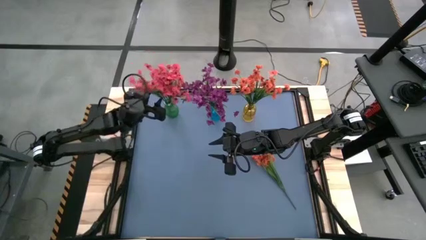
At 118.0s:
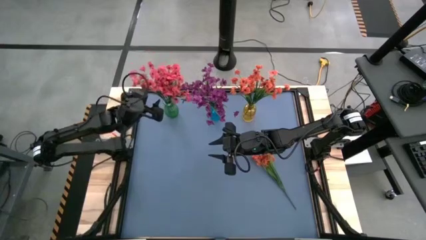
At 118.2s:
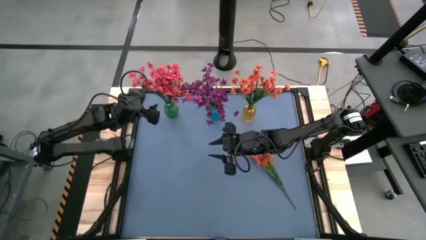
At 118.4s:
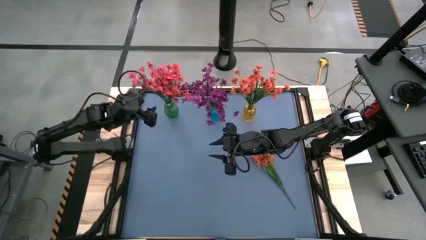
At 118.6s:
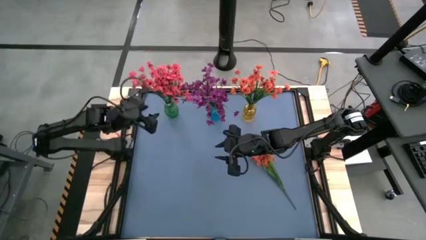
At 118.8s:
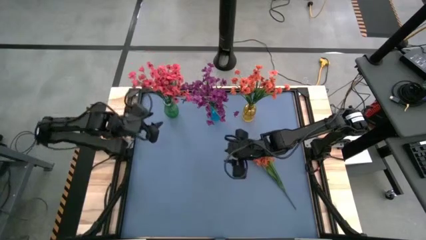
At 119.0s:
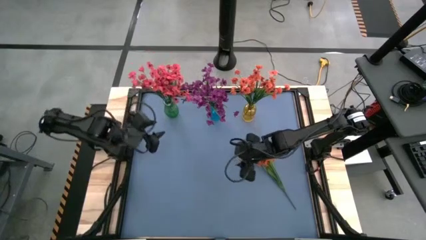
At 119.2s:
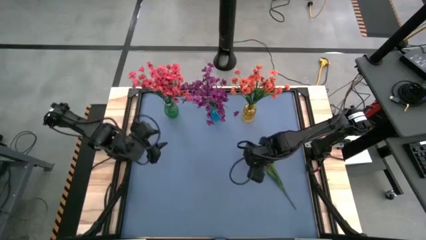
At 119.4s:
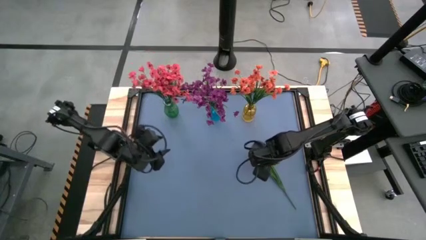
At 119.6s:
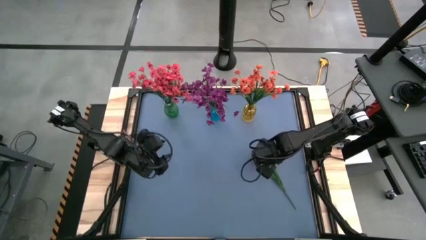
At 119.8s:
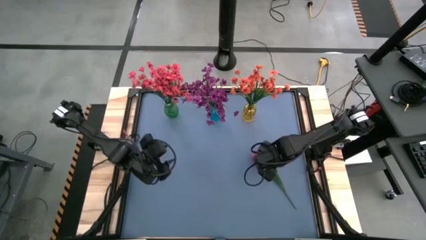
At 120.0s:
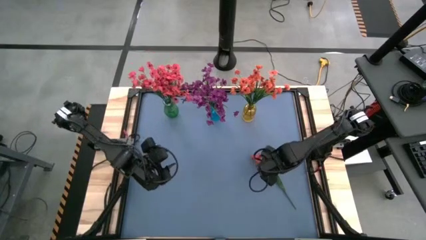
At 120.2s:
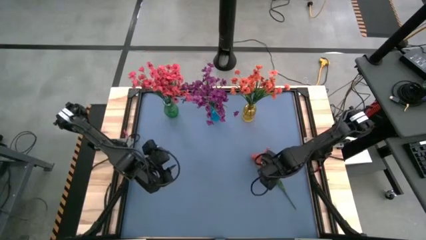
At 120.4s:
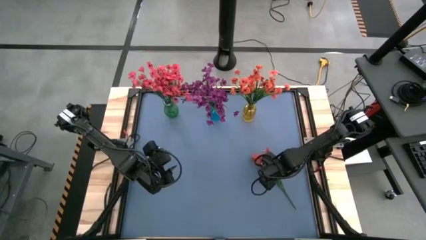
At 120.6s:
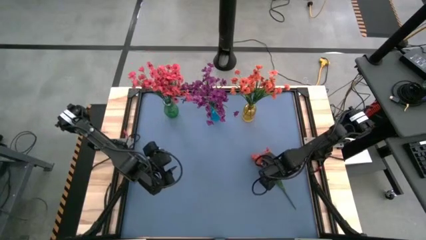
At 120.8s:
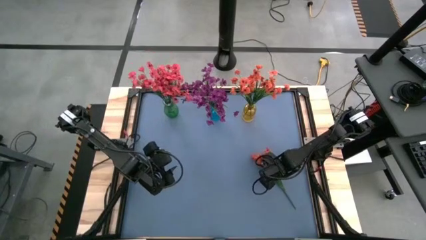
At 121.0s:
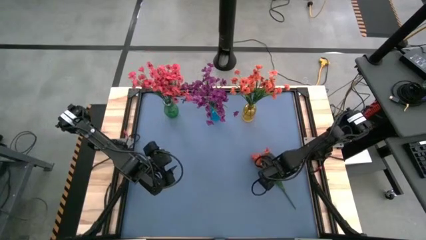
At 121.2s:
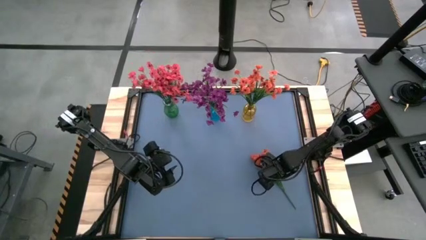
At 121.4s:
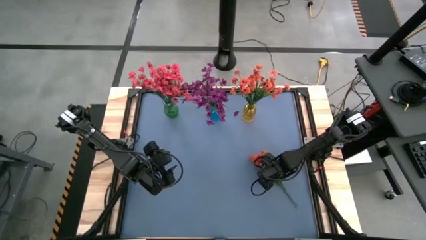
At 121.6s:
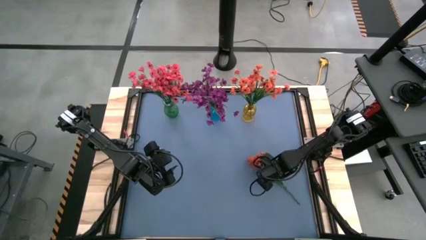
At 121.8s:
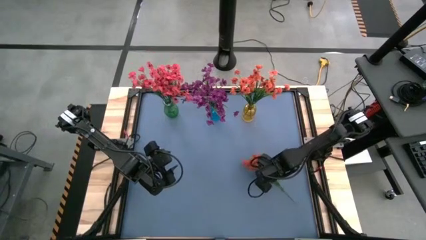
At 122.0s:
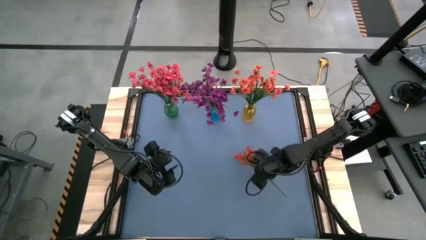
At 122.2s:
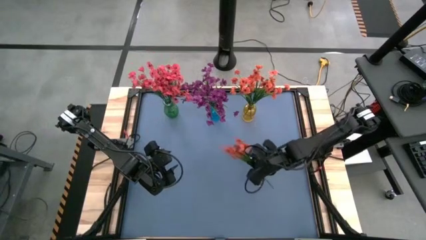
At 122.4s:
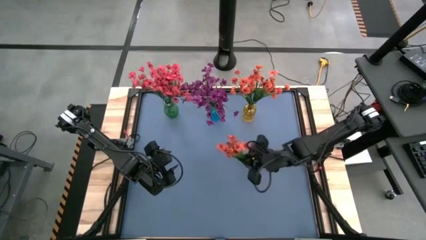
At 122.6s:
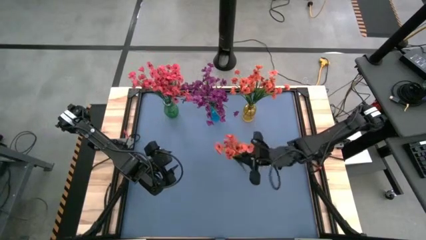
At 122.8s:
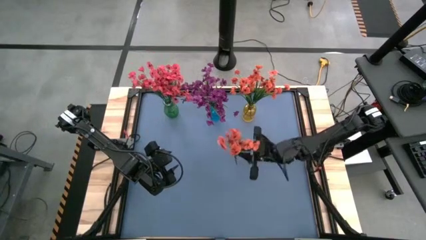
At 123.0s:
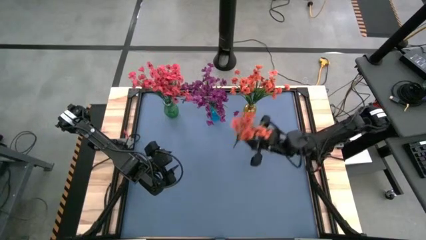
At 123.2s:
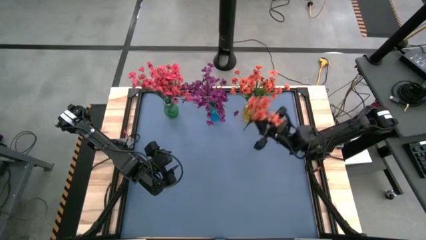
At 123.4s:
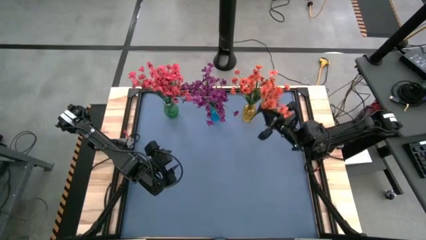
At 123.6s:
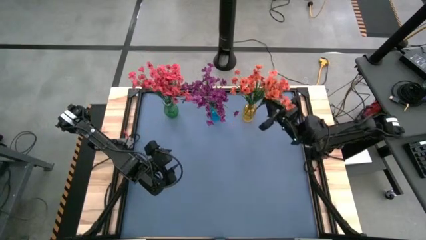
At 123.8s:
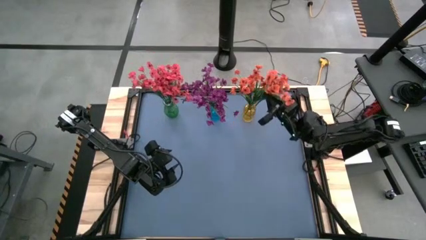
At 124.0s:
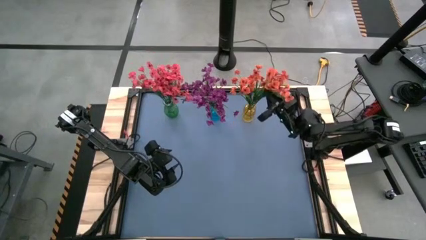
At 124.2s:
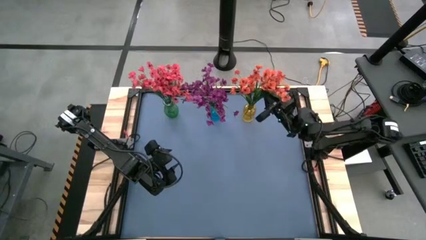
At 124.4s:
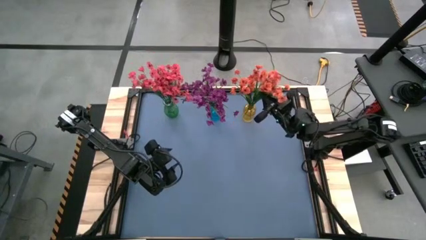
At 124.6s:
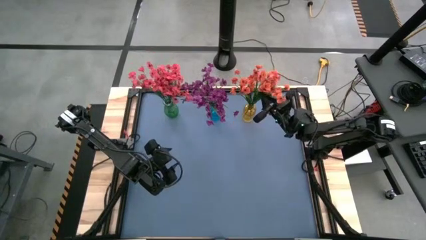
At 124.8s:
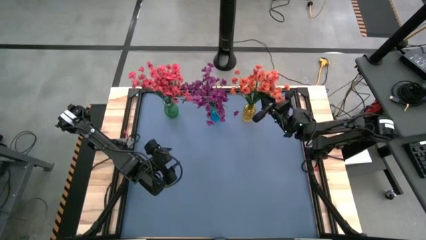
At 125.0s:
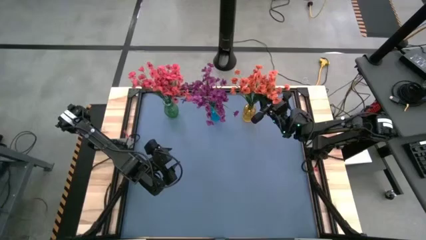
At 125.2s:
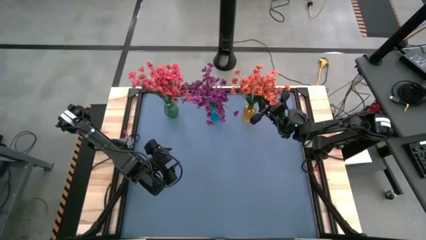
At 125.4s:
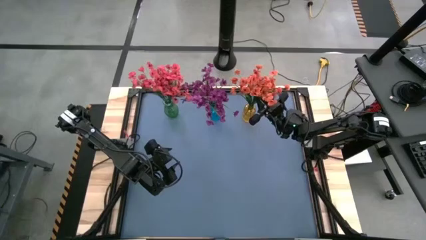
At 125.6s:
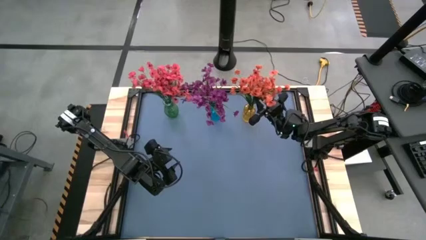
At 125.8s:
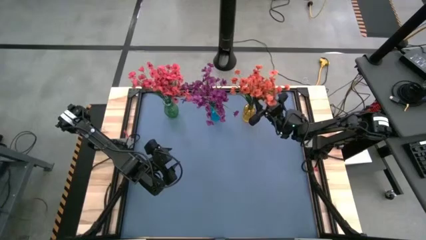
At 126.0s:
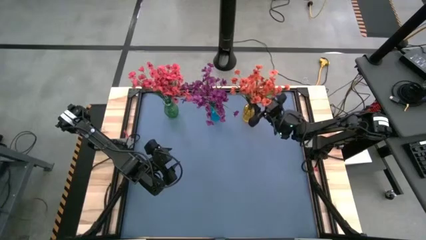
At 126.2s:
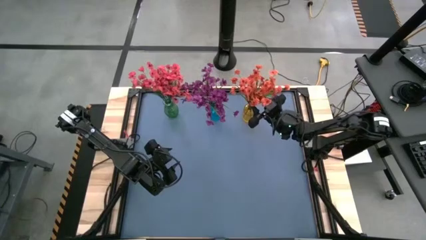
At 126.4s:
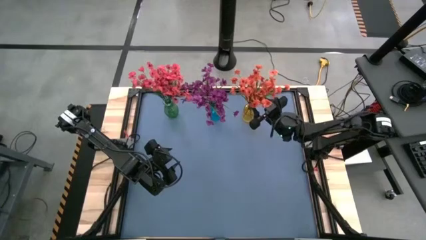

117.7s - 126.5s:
Task: Sort flowers into vase by color
Put the orange flower into the green vase

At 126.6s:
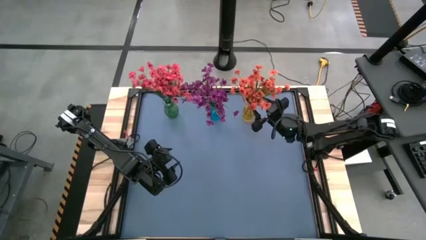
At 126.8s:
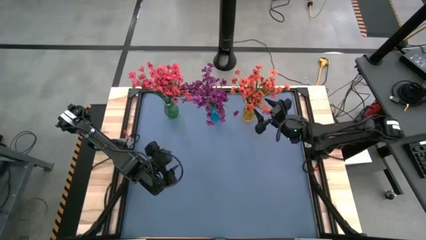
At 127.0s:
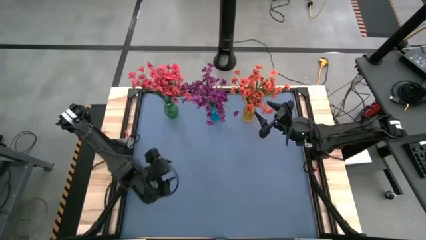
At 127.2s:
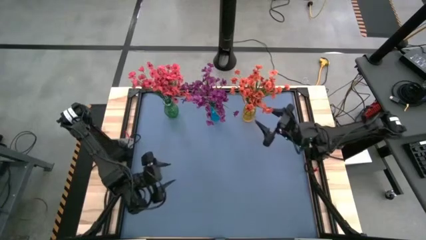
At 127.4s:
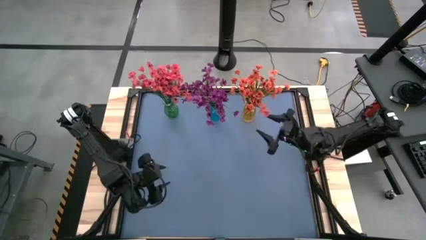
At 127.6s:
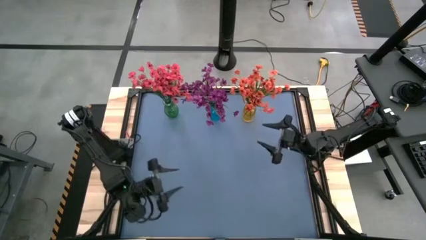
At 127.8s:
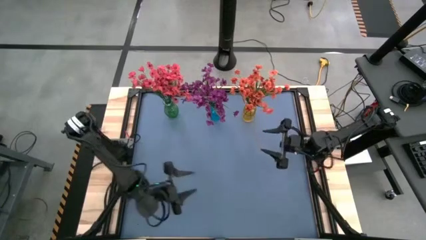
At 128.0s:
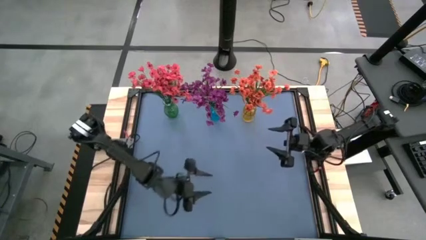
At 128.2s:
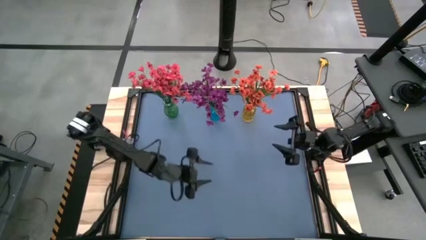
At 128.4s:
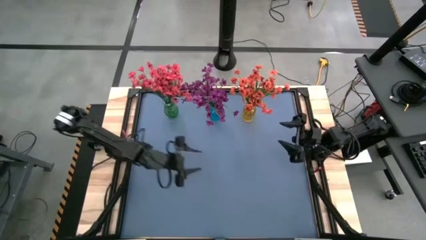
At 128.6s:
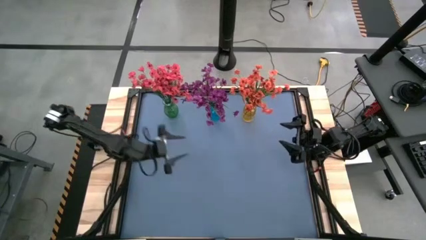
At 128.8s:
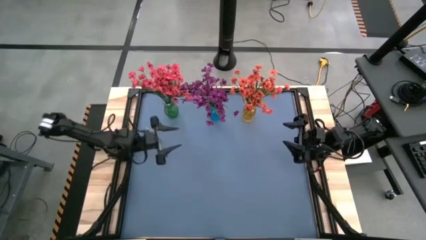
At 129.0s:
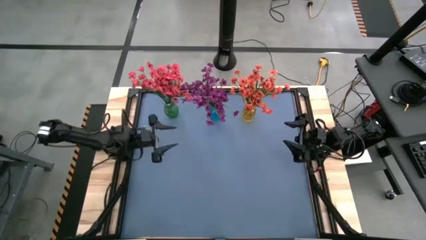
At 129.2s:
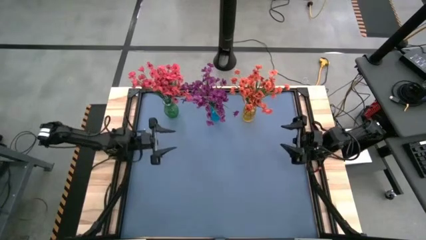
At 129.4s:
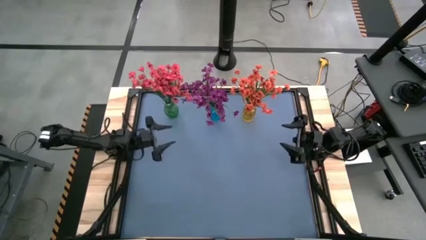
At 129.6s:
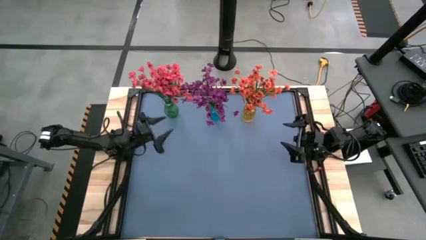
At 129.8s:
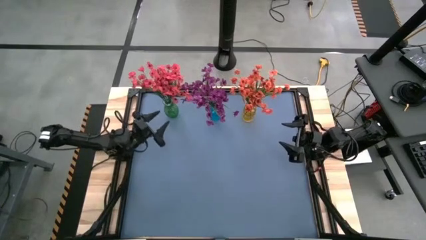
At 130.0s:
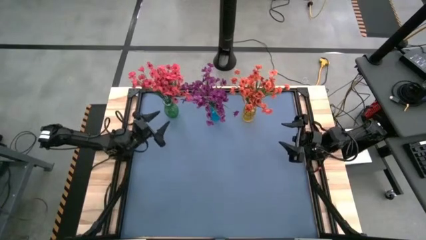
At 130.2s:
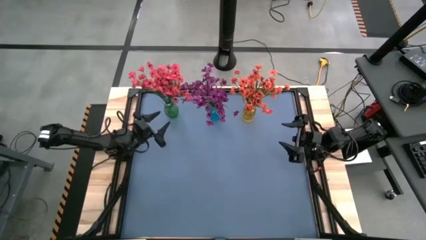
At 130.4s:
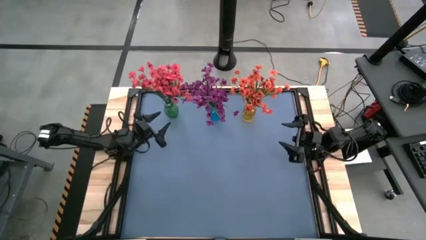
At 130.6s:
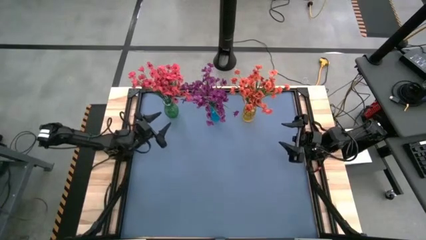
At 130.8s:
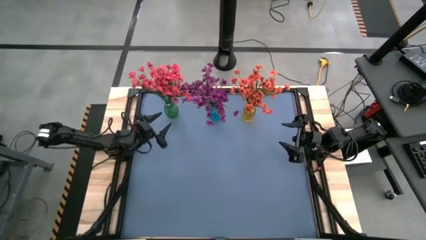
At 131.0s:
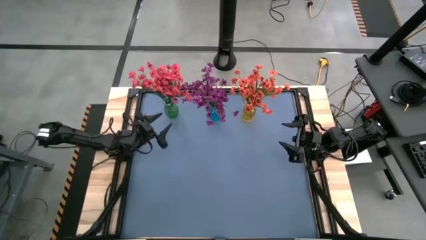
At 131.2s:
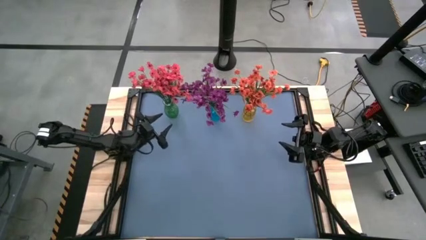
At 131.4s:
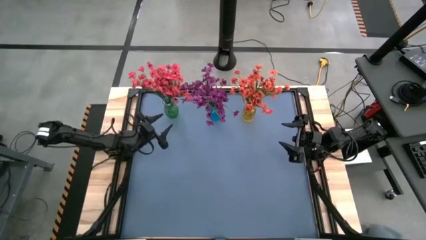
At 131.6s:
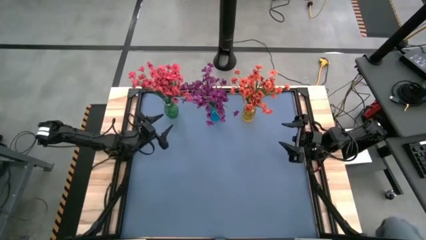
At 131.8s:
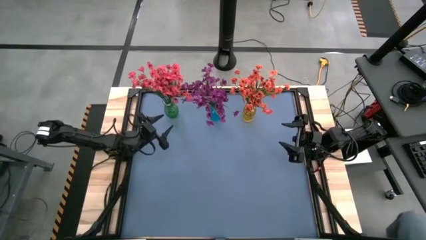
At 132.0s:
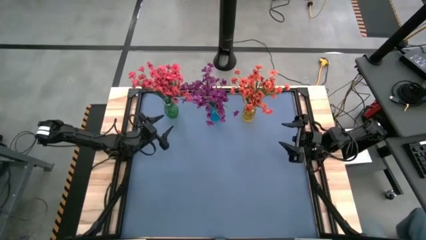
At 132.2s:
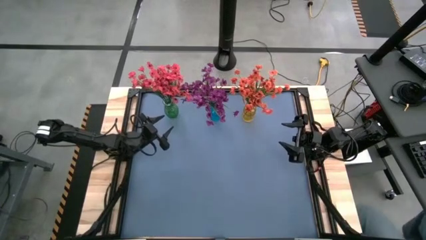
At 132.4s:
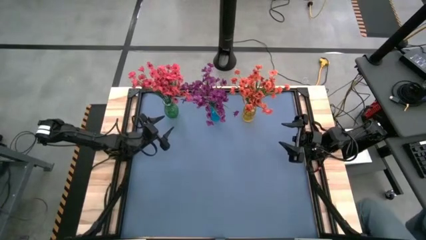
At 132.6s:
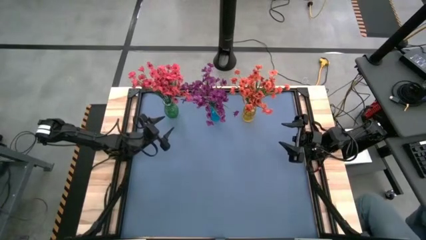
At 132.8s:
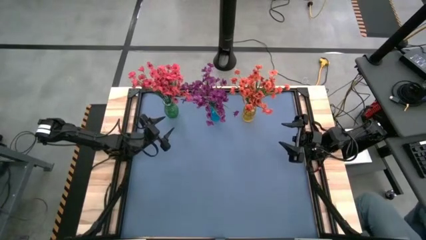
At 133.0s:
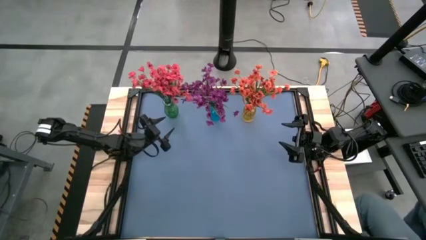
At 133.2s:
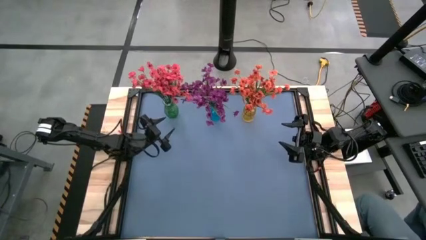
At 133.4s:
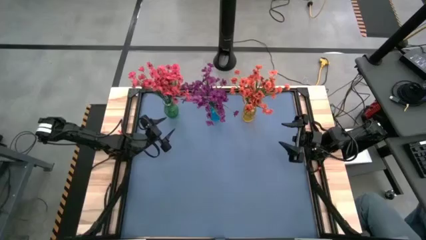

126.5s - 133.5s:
Return to Home Position

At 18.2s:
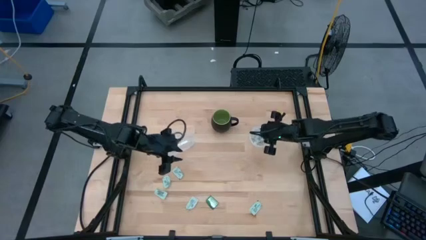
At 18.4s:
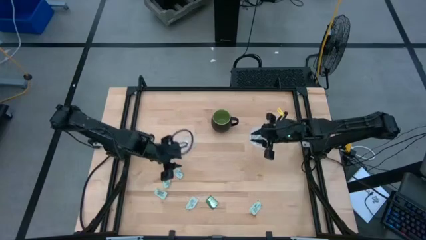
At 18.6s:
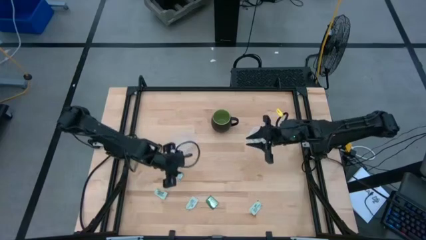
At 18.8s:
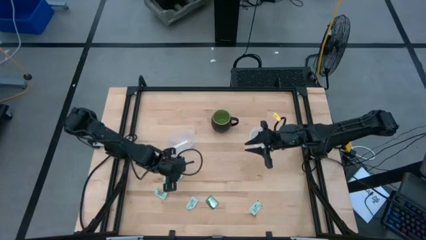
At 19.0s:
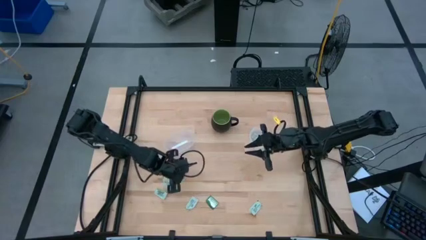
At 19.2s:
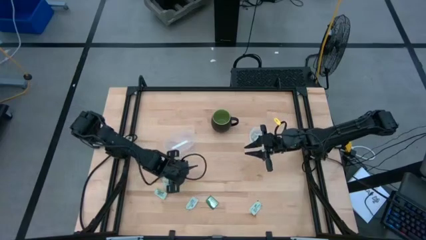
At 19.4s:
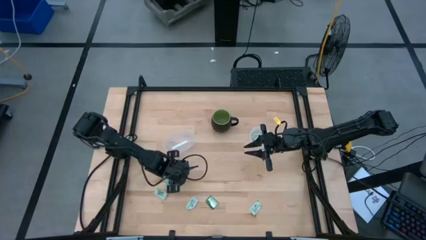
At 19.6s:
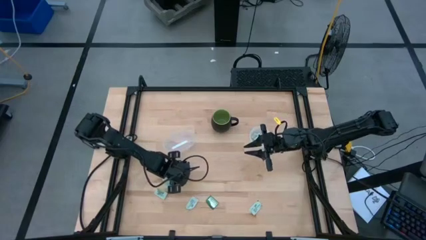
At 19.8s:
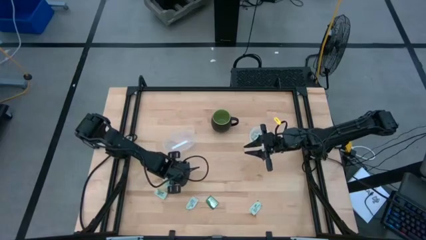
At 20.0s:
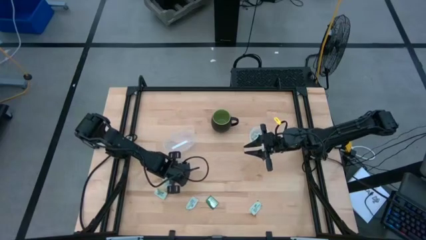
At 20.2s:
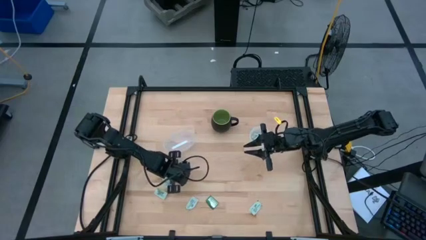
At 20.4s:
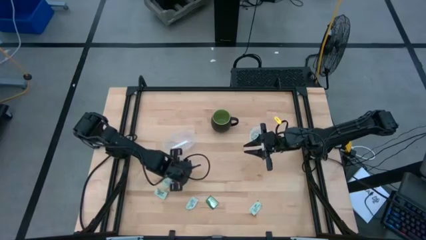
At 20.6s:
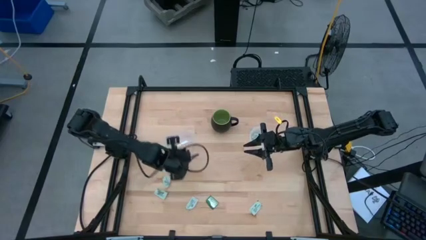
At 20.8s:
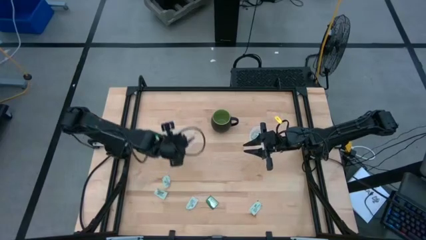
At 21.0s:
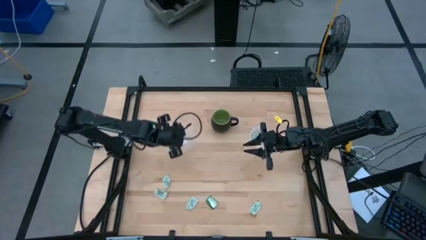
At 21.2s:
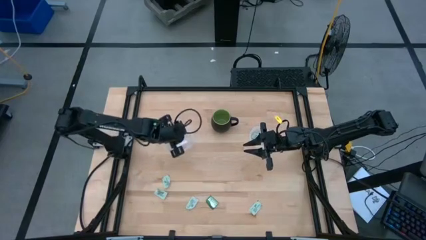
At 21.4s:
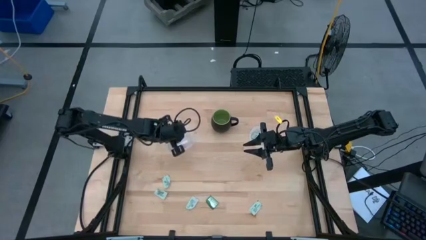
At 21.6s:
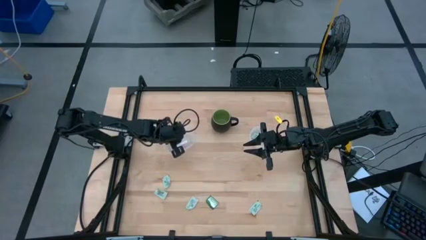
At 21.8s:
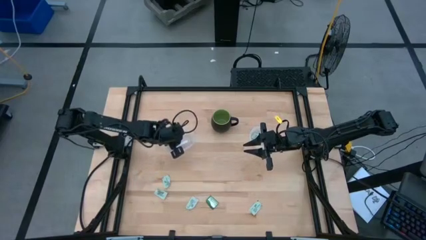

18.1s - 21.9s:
Task: Pick and place Stevia / Truvia into bins
Put the green stevia packet into the left transparent container
